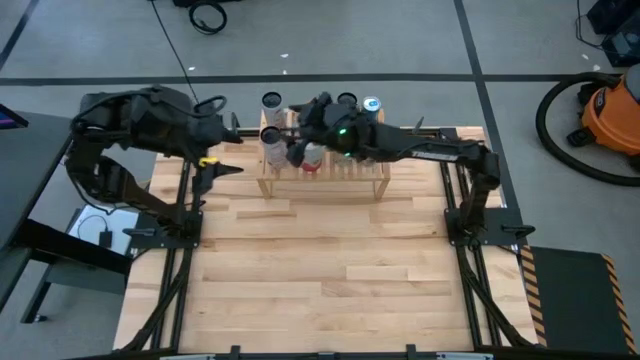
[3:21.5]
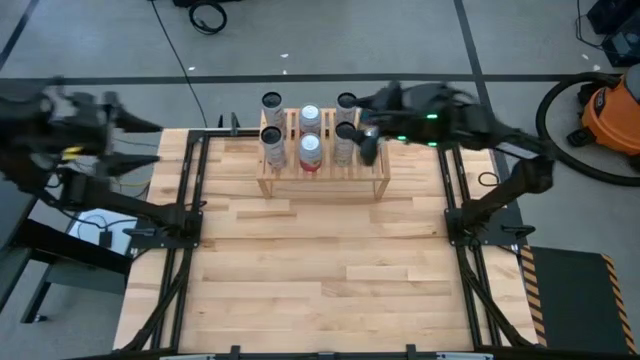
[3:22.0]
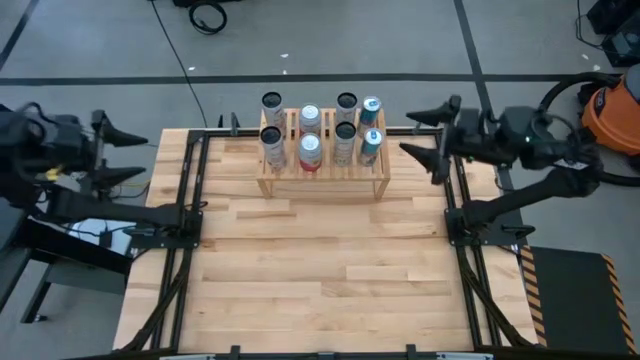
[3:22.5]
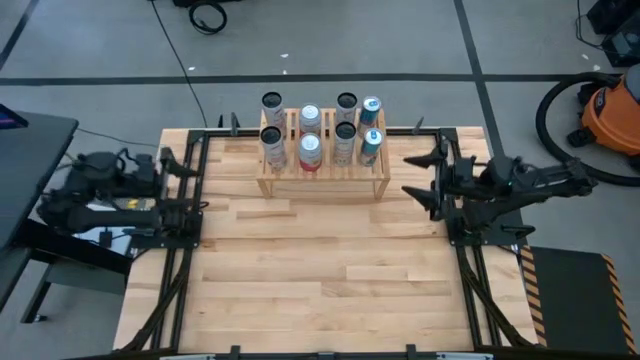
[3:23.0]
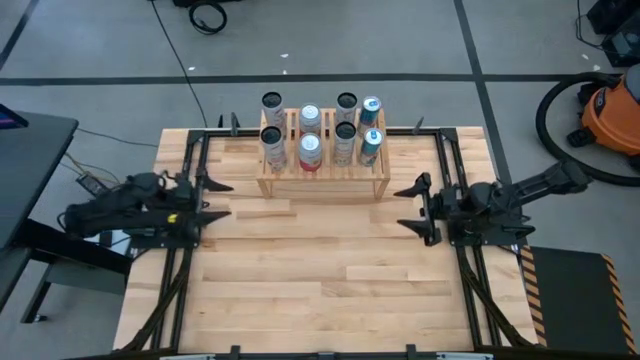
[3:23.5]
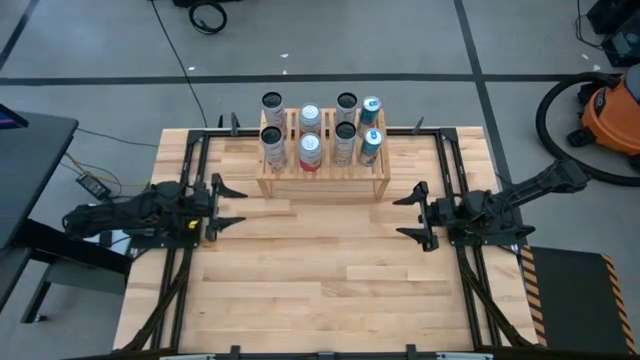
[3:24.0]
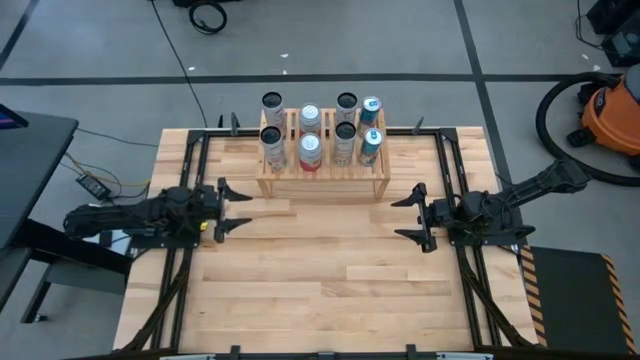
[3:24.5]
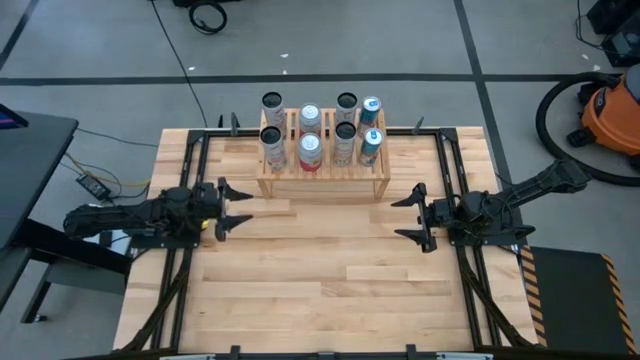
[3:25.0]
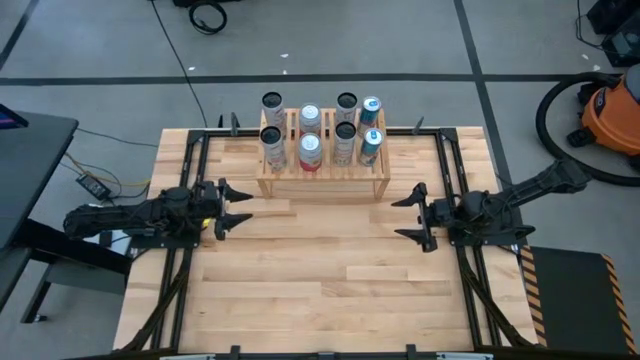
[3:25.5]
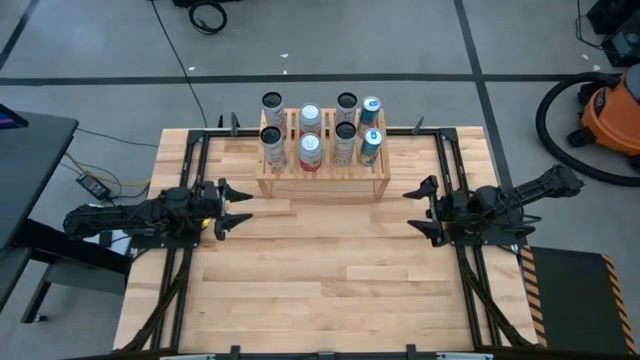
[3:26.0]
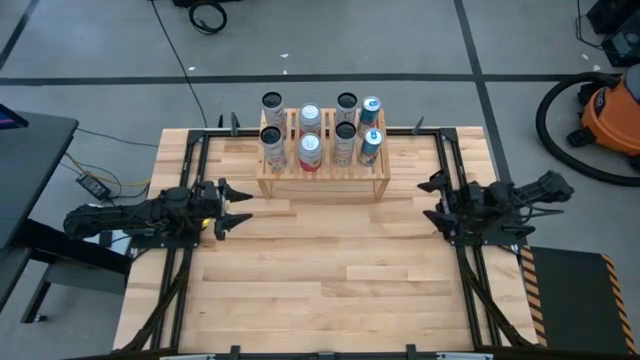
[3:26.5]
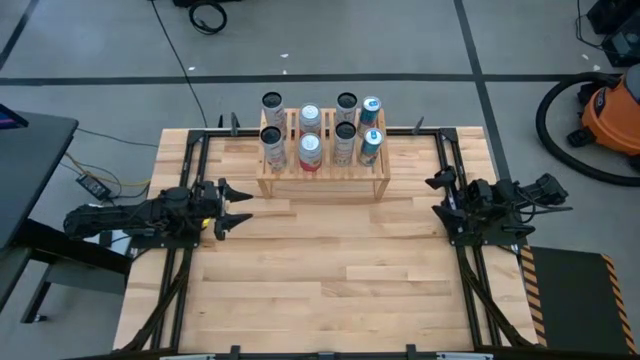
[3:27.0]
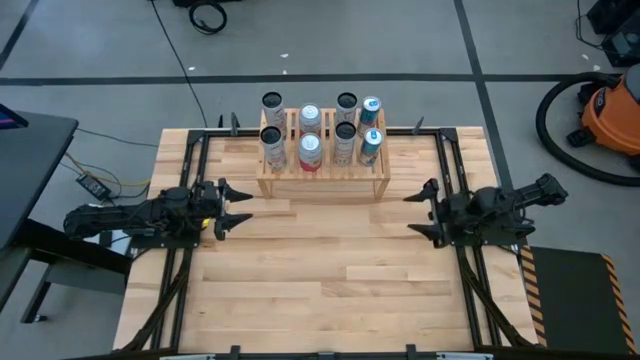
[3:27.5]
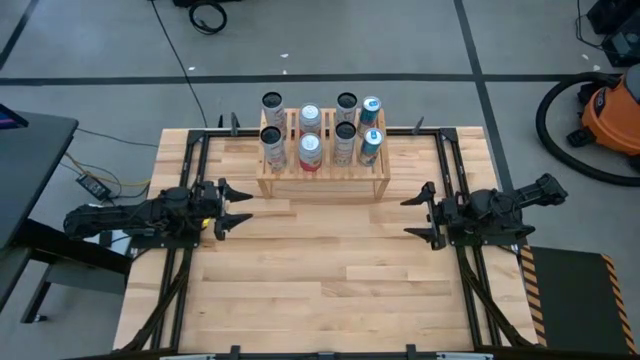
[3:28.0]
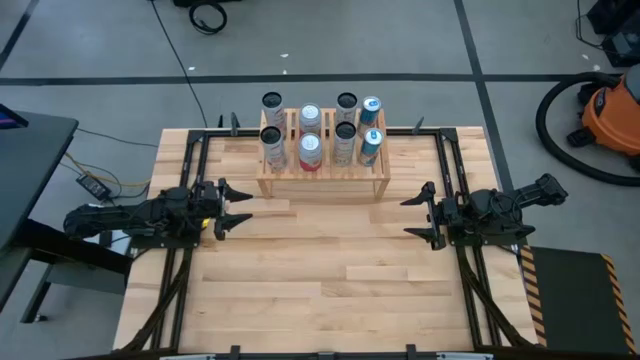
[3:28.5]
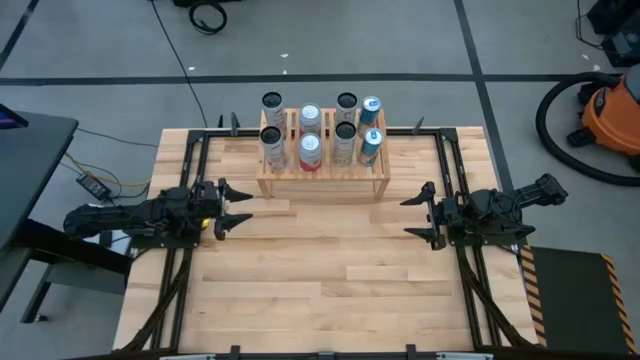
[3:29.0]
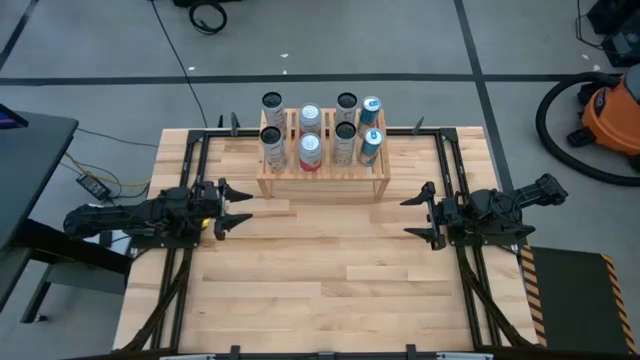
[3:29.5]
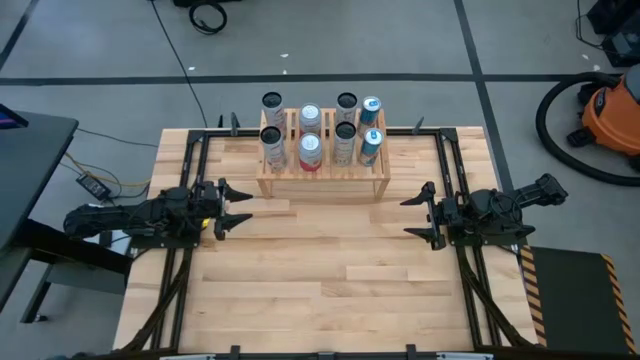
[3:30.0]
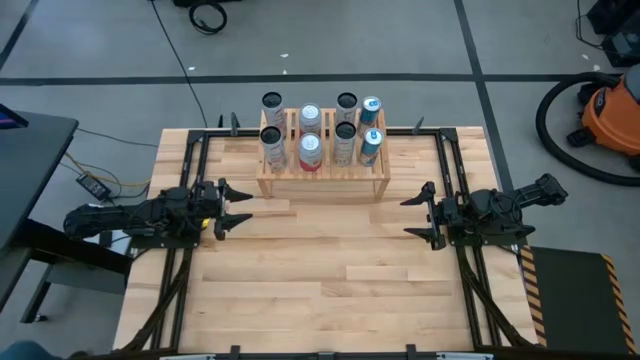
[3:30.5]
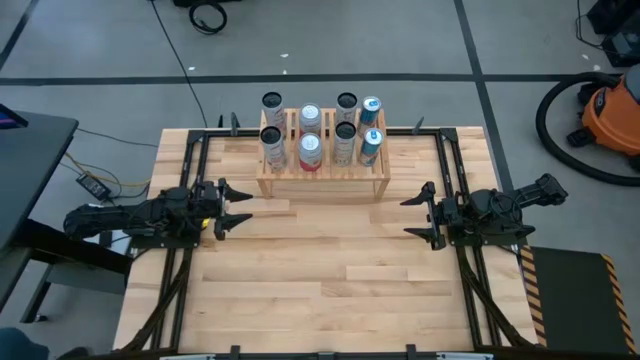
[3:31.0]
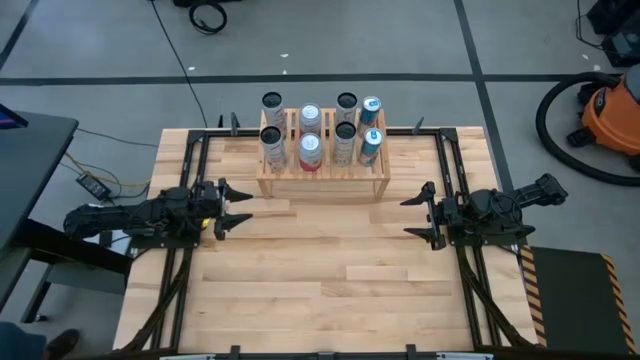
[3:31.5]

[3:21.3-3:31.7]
Task: Place canned beverage on shelf
Return to Home Position

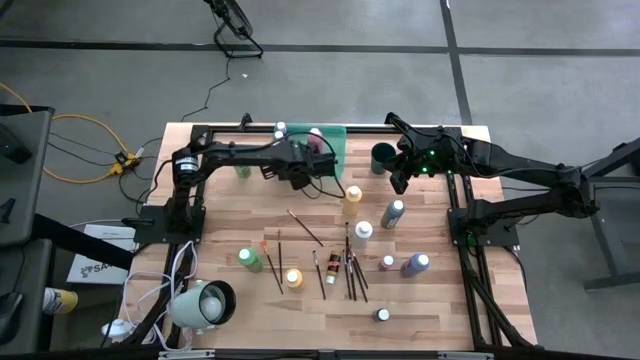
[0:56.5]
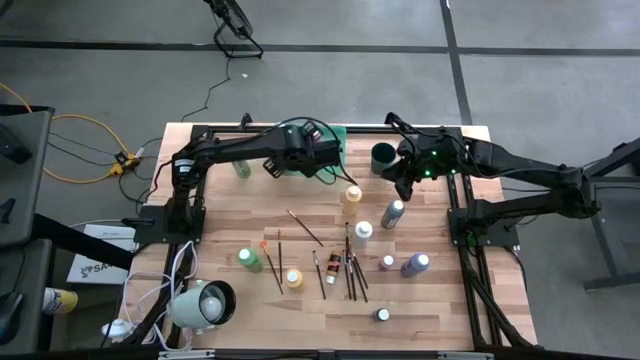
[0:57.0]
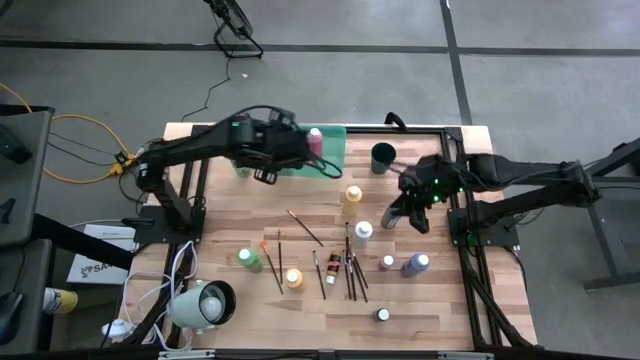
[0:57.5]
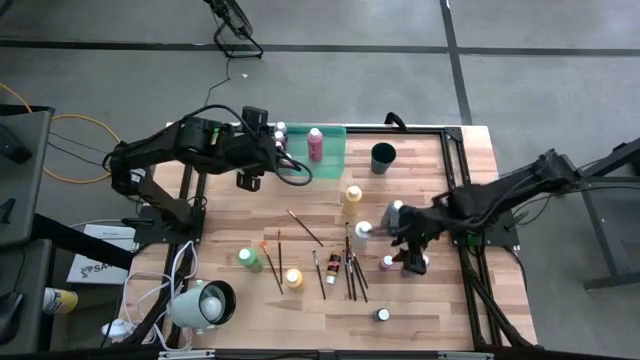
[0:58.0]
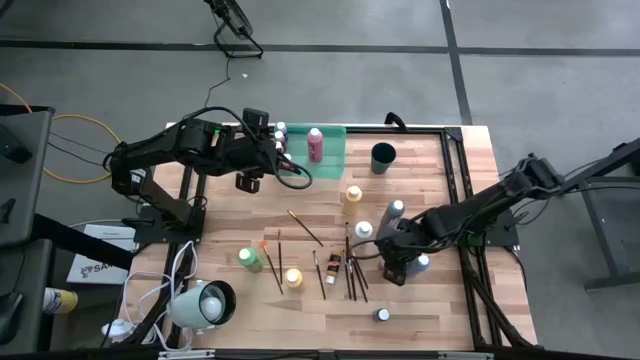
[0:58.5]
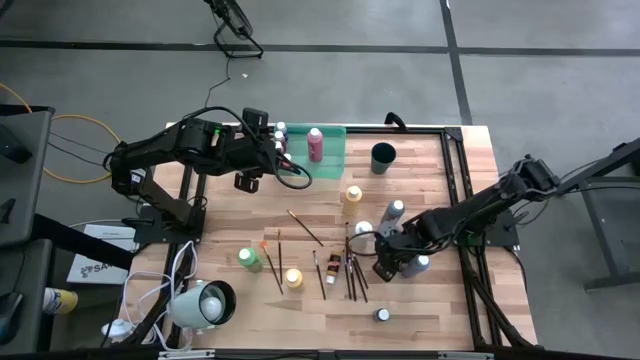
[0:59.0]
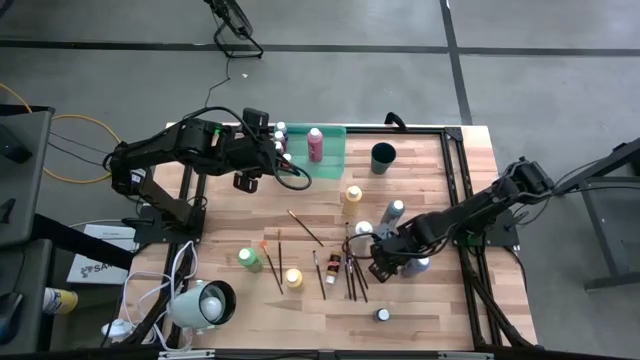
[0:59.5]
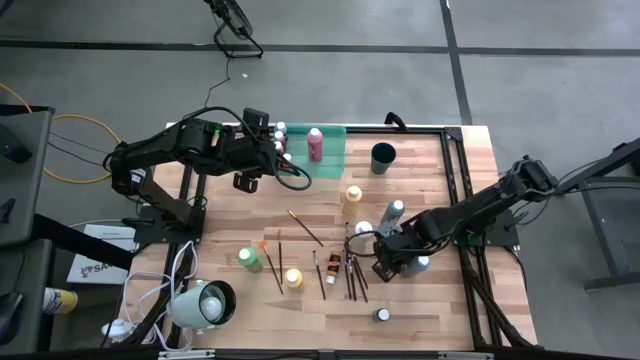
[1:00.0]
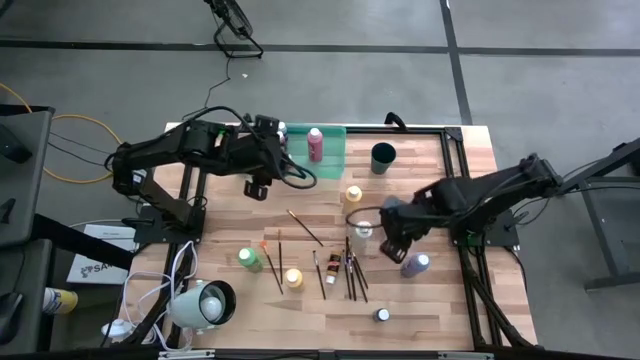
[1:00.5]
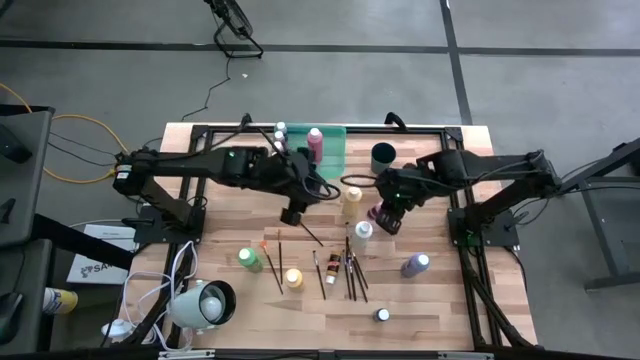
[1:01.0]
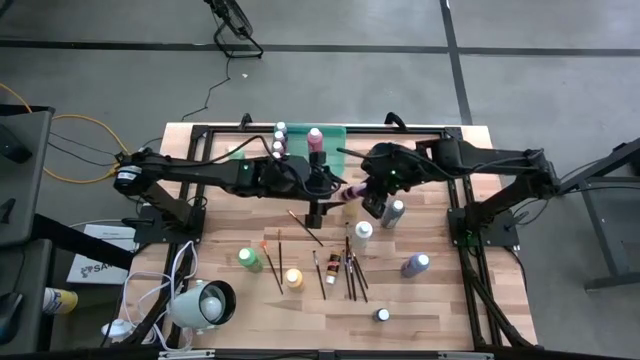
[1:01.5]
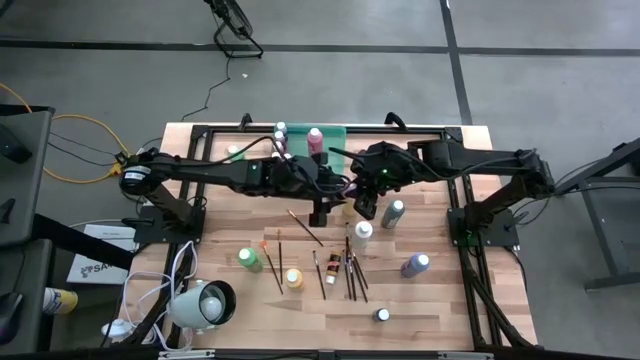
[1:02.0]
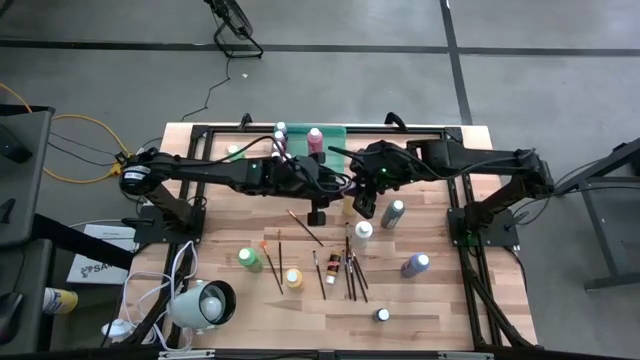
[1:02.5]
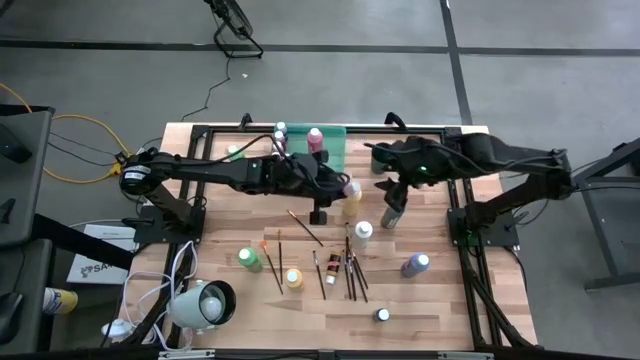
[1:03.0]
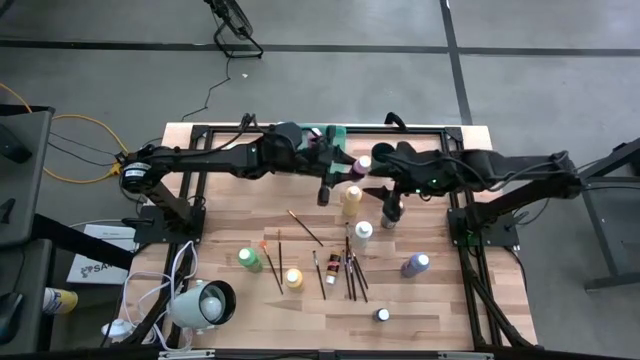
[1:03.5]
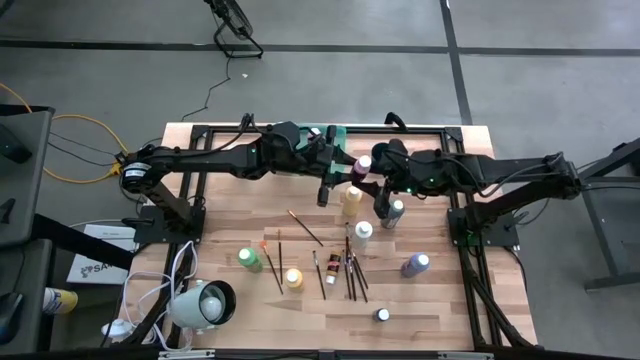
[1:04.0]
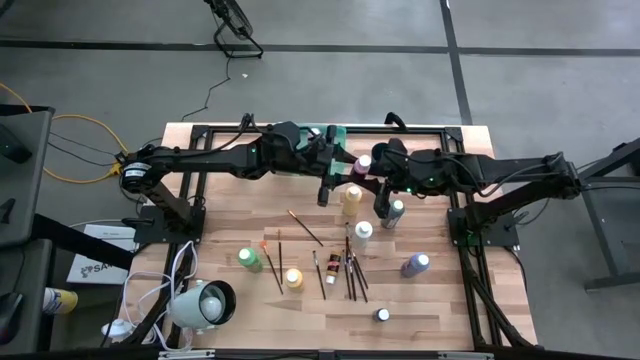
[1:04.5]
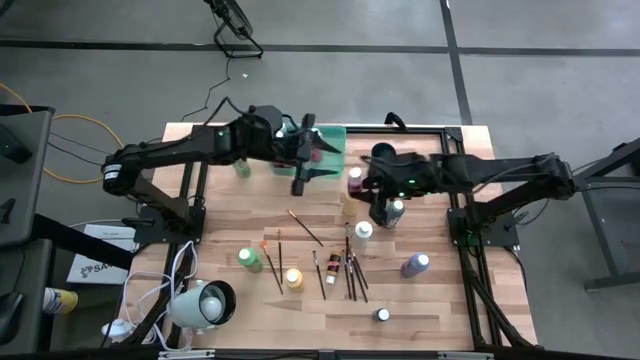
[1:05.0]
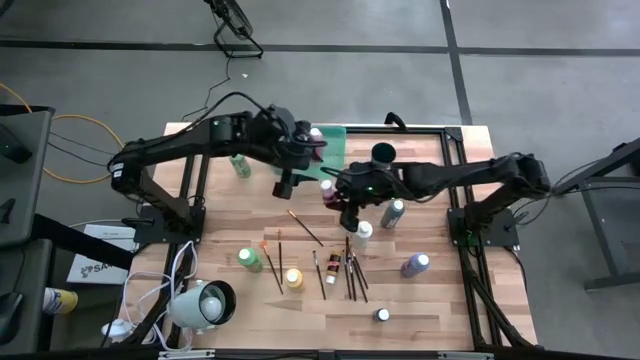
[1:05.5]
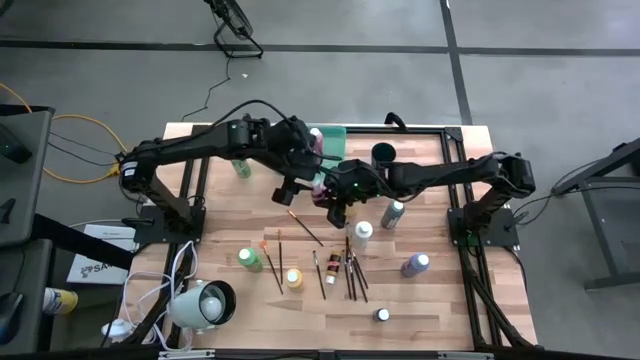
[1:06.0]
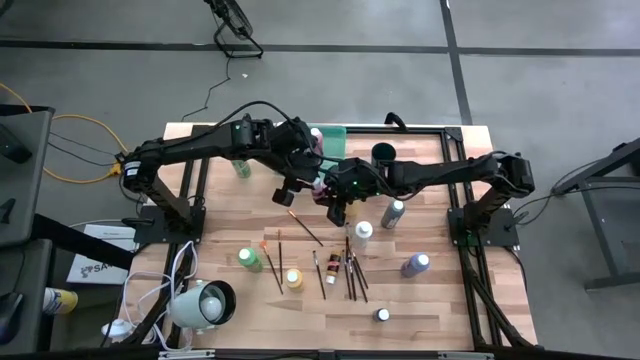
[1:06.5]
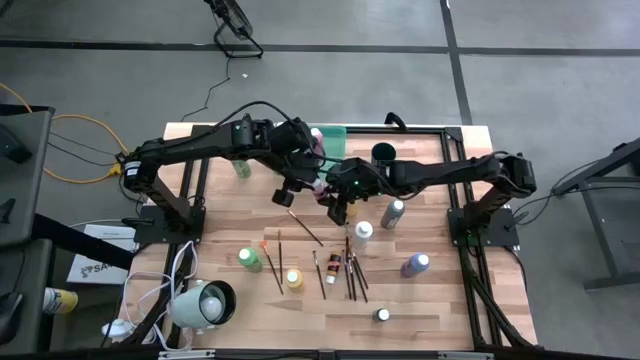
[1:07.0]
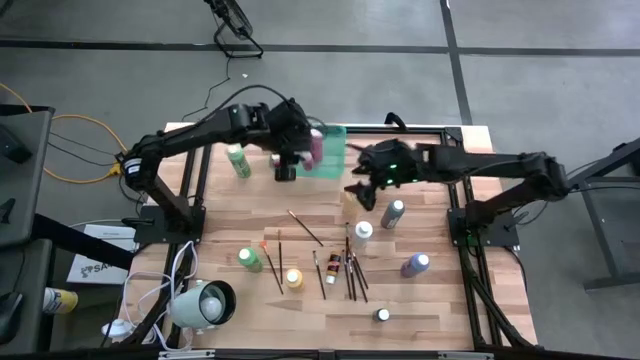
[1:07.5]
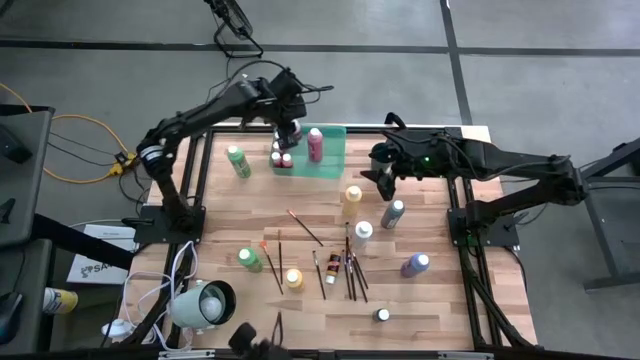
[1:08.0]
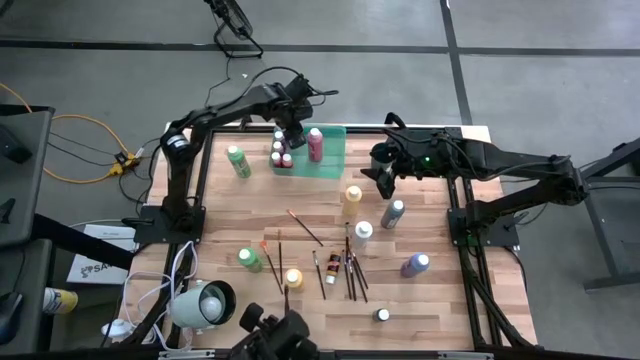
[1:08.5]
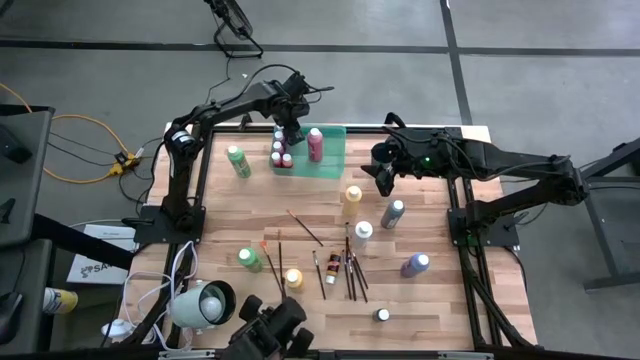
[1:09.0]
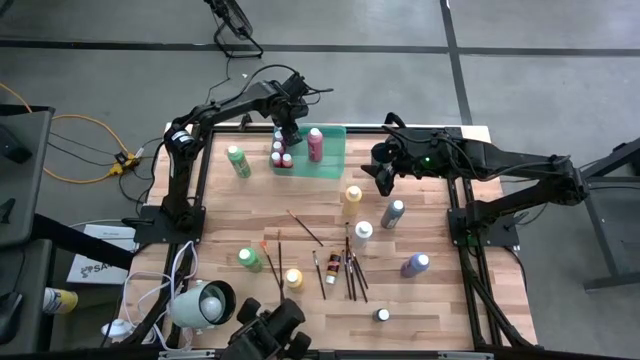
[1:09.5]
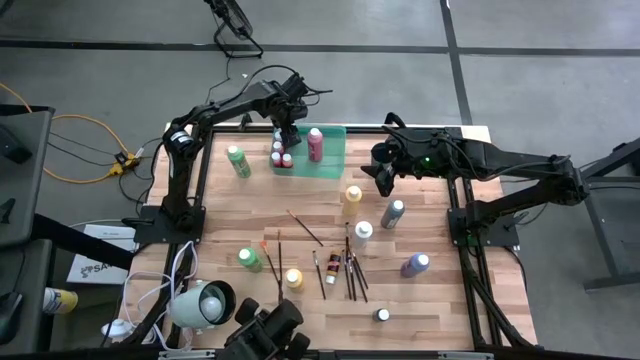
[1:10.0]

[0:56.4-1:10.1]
Task: Pick & Place Paint Supplies
Put the small pink paint bottle into the green bin
